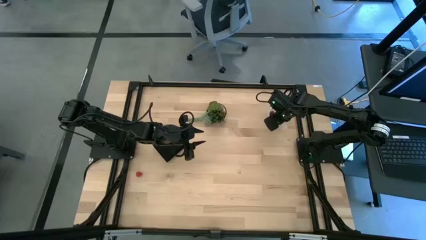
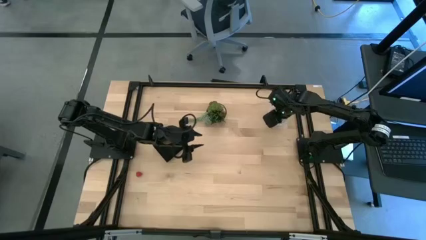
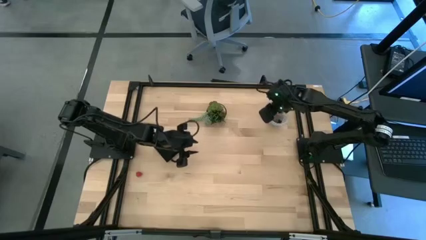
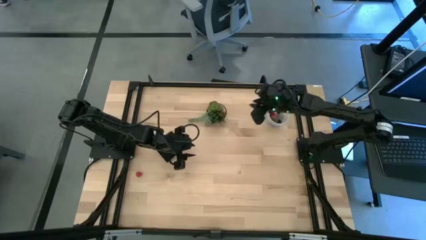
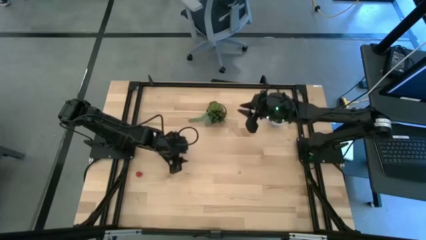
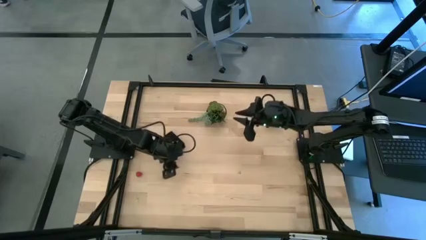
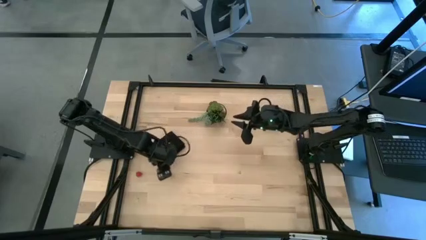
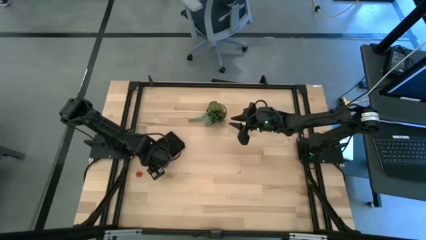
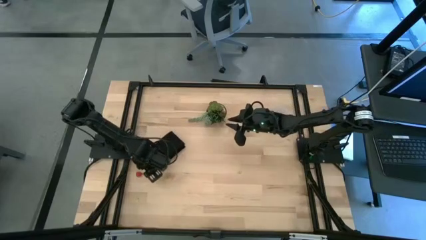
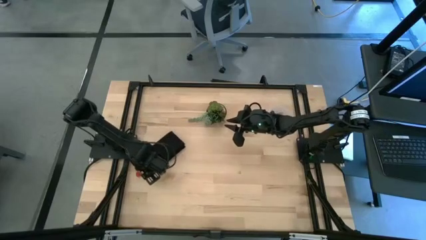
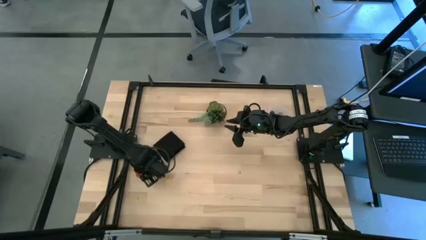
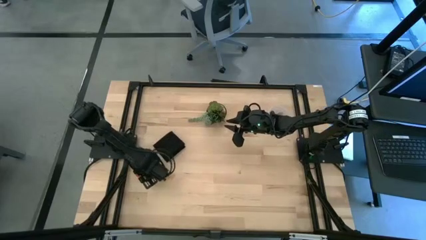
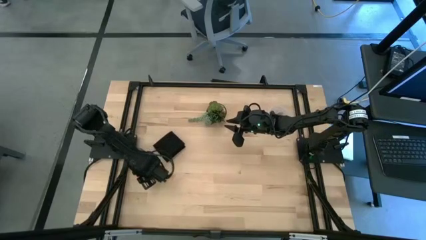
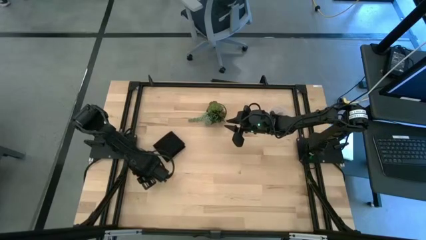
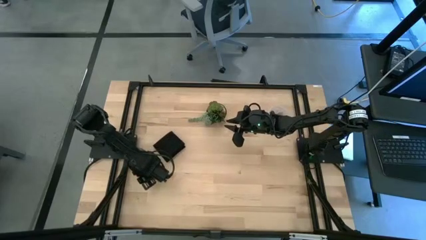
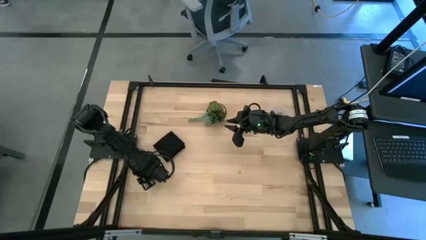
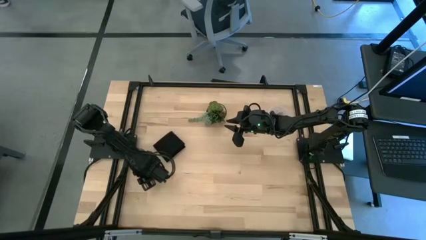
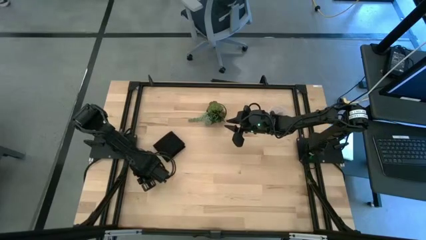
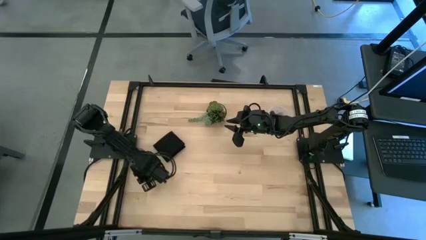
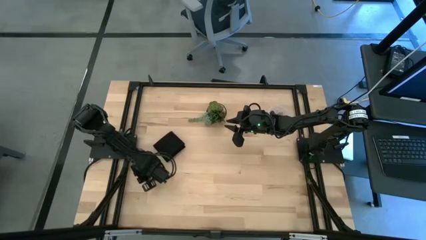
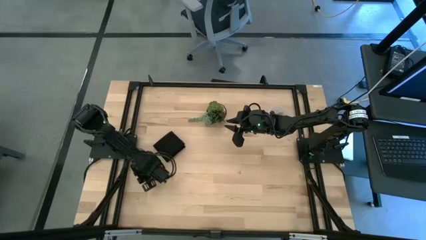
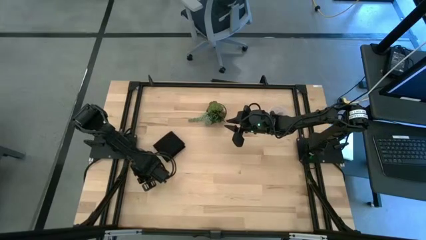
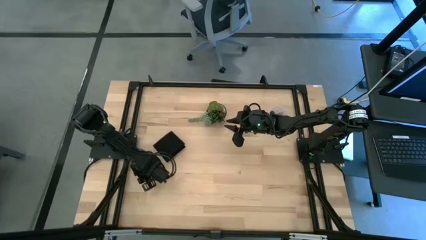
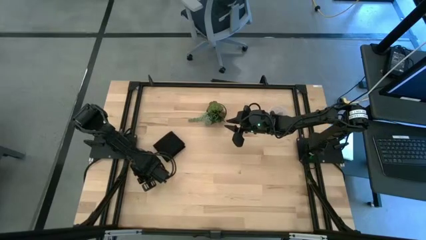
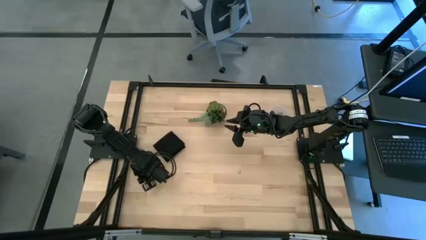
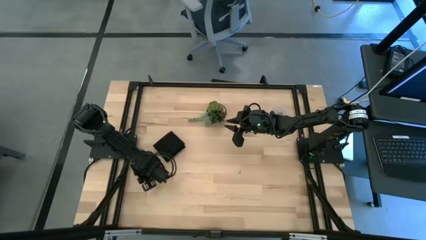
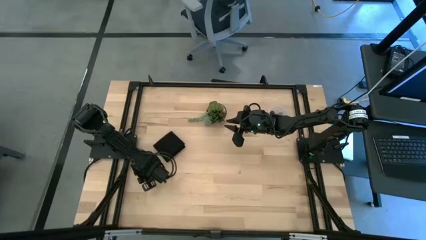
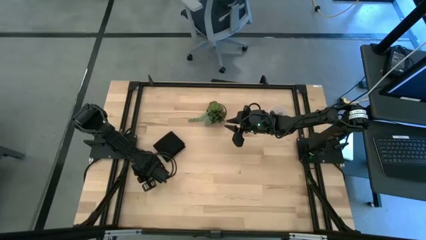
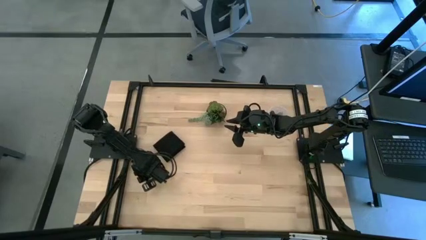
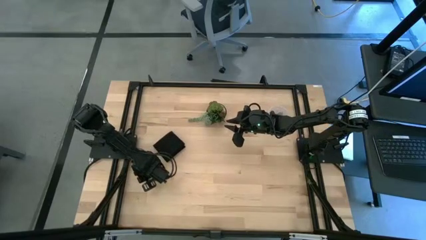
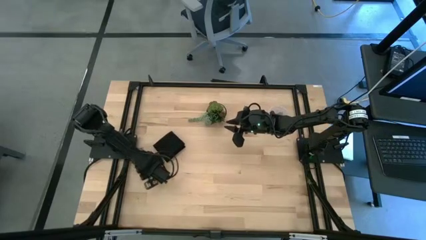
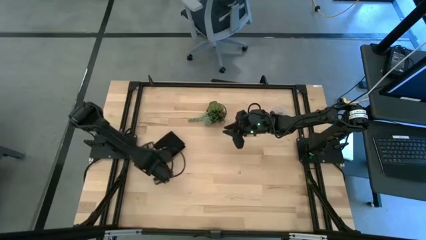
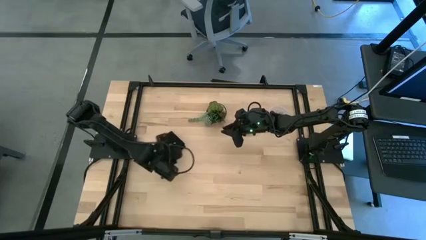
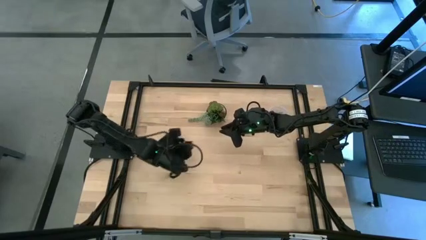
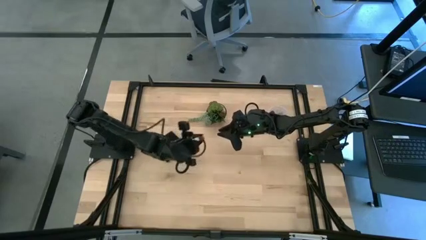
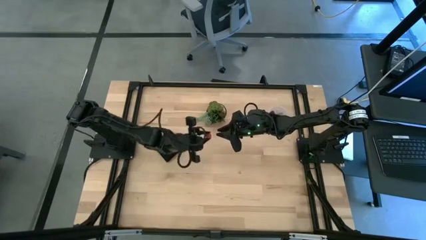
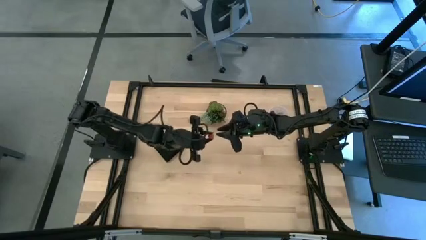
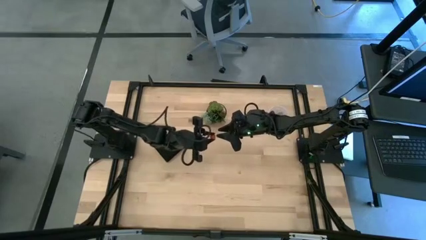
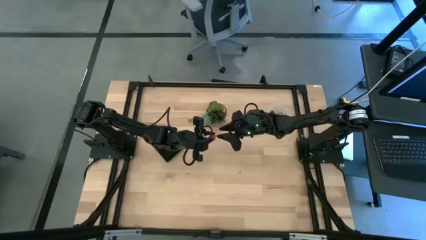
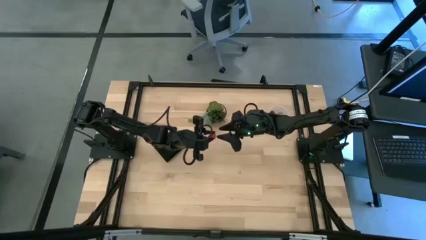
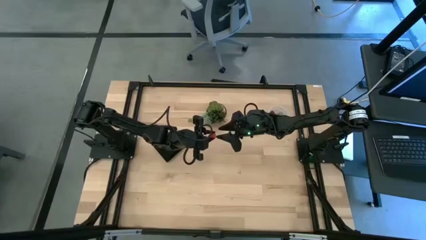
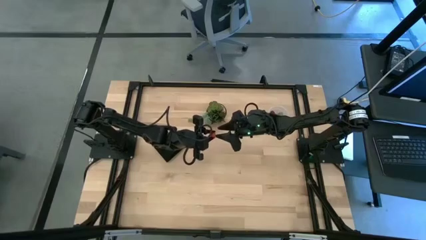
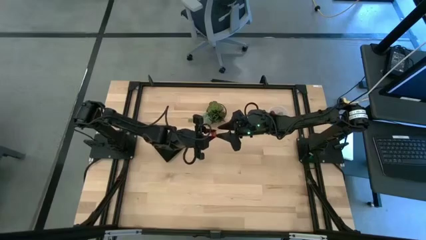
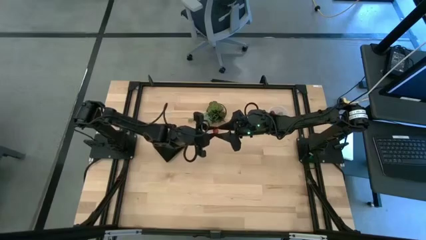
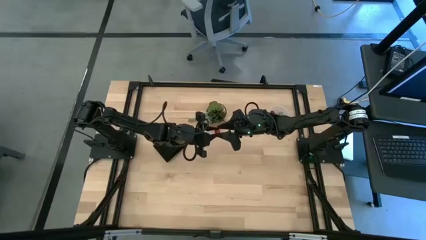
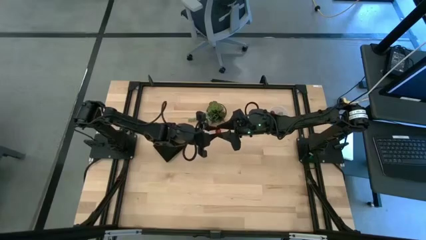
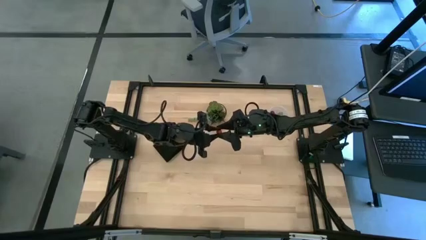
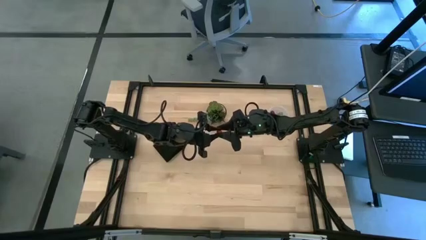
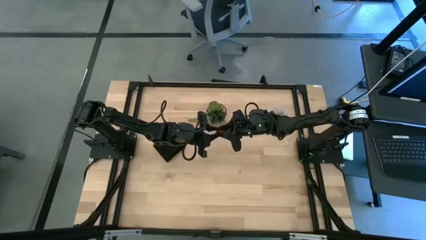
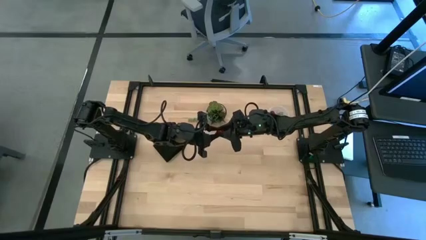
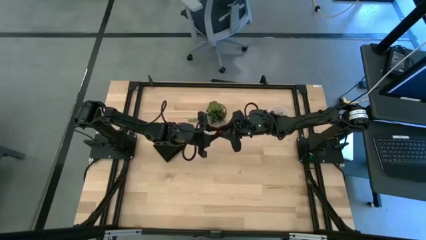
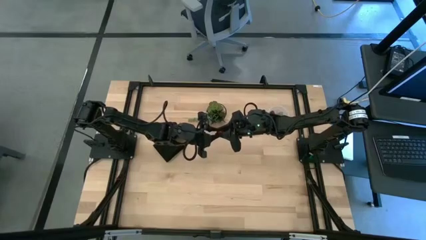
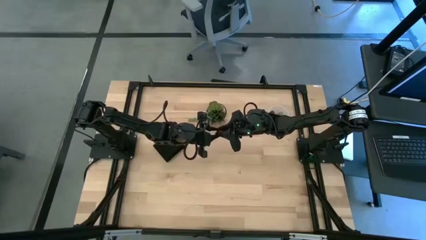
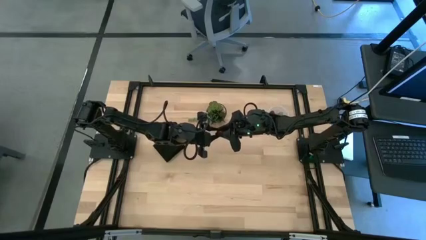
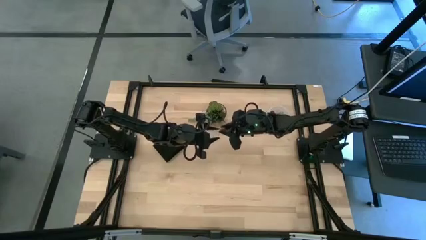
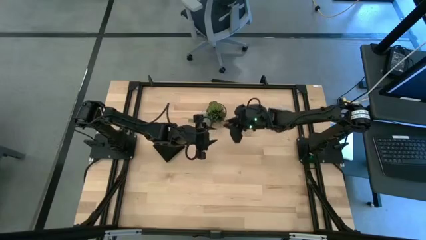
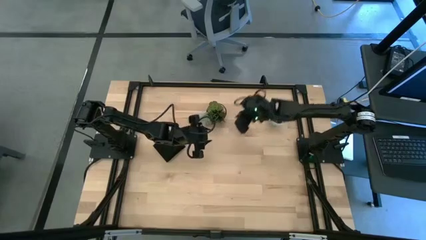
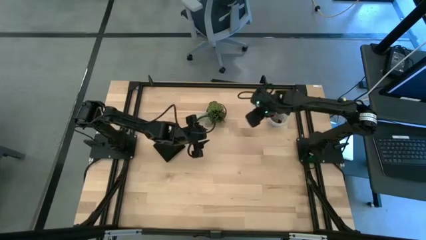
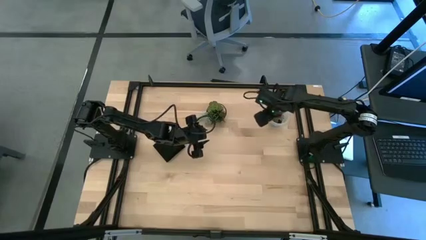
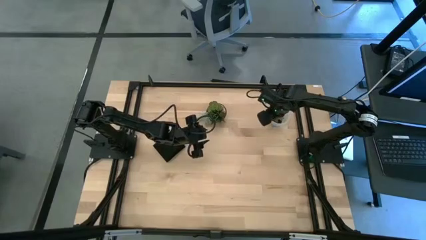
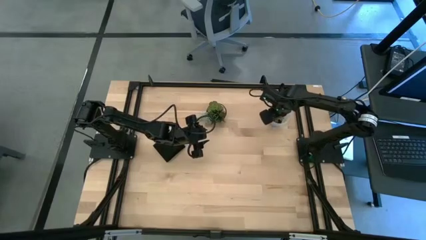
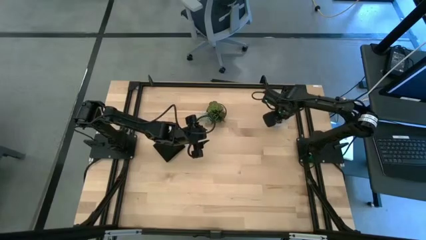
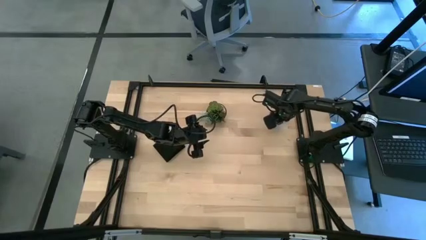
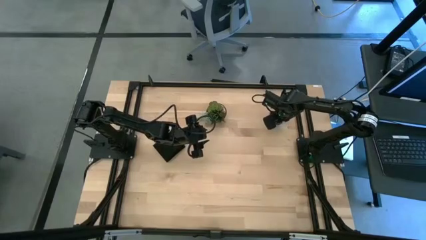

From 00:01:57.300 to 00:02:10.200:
Task: Pick and placing Produce into tupperware
Put the red raspberry into the bin

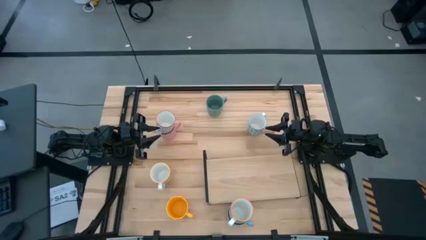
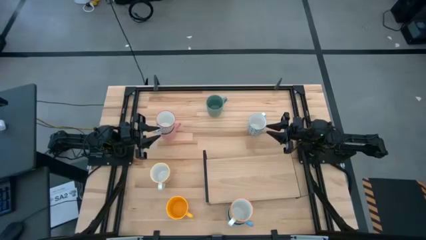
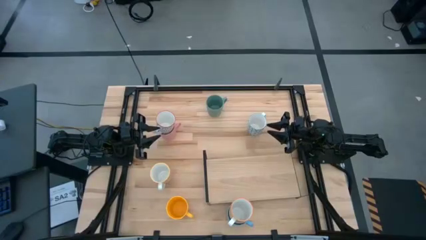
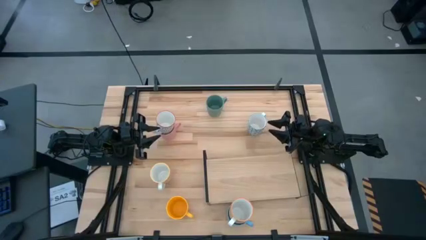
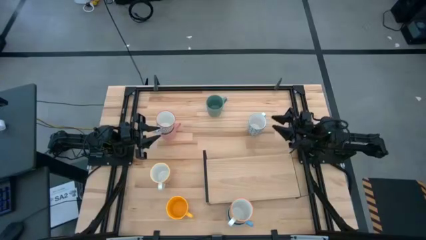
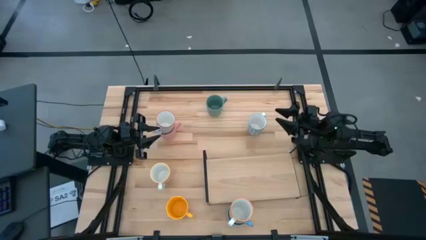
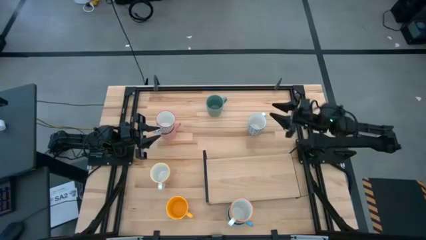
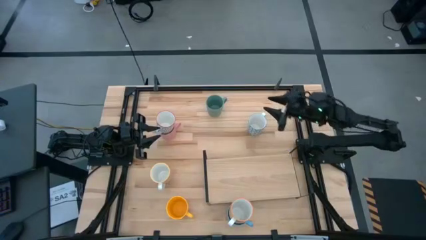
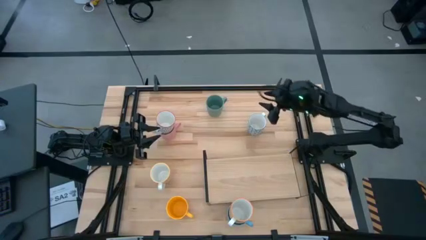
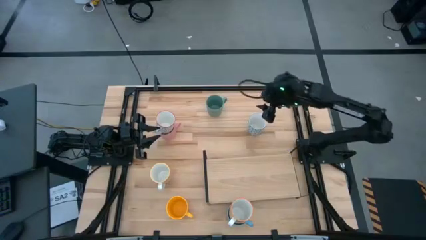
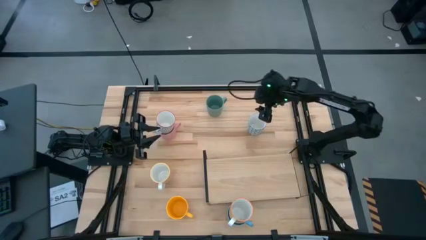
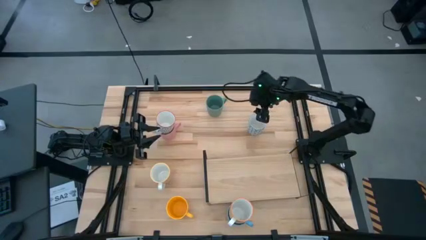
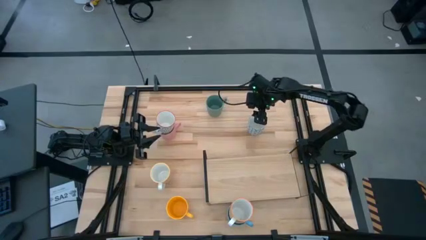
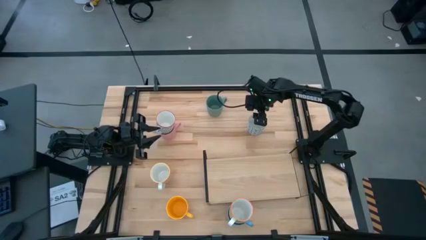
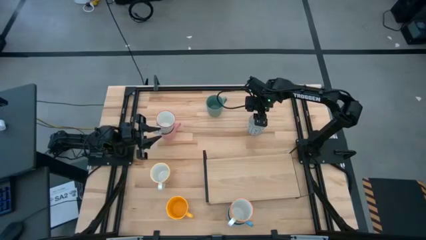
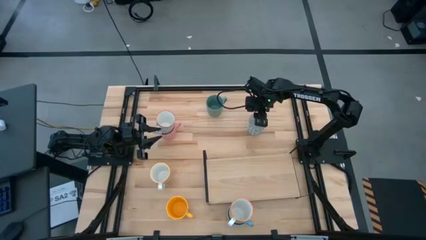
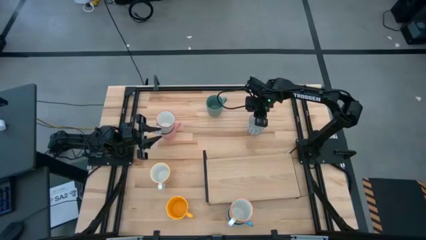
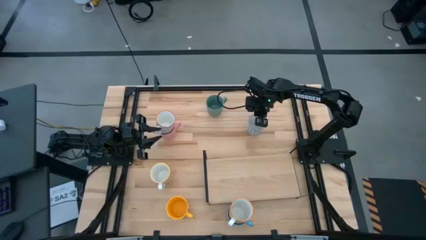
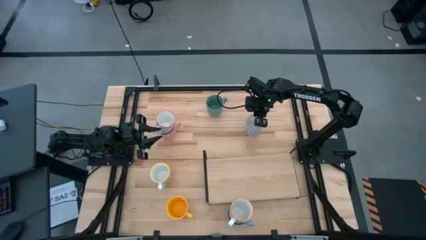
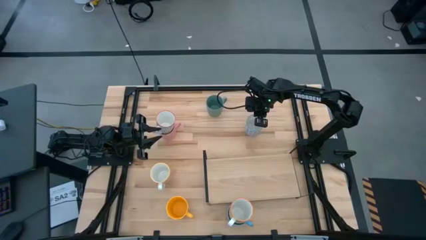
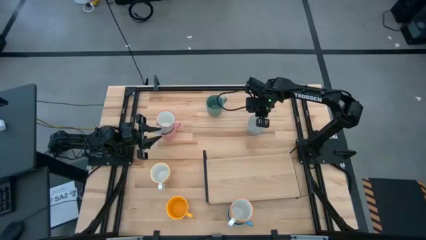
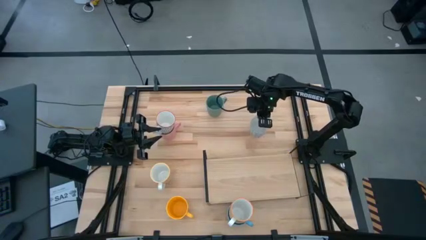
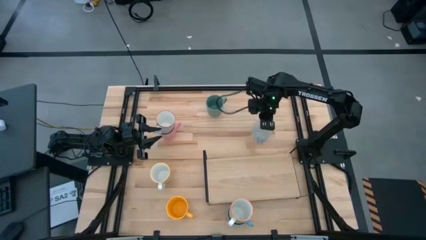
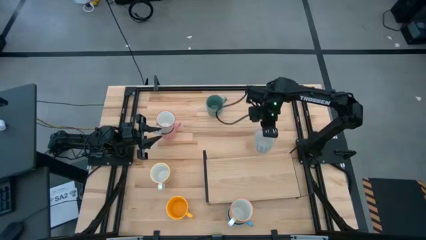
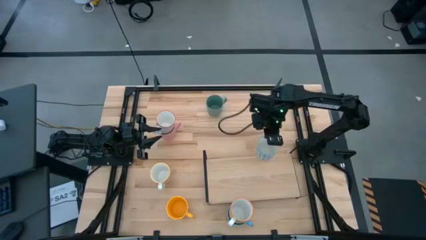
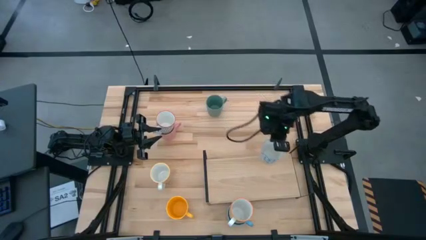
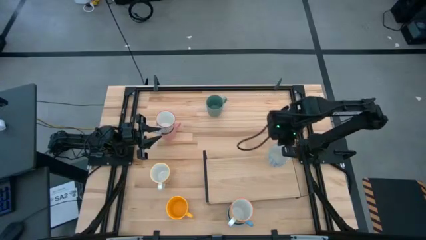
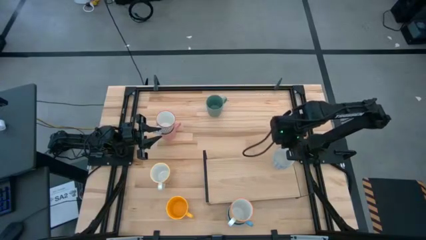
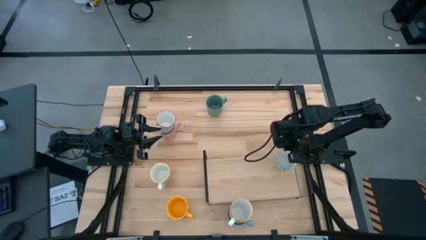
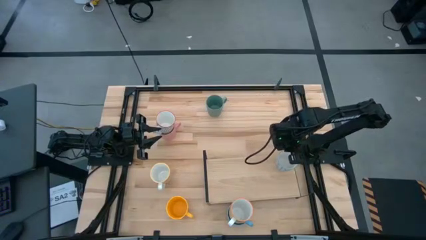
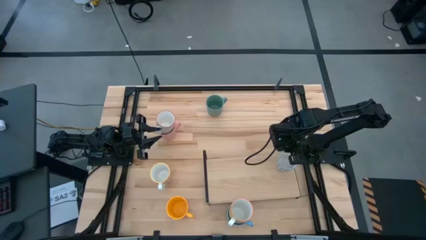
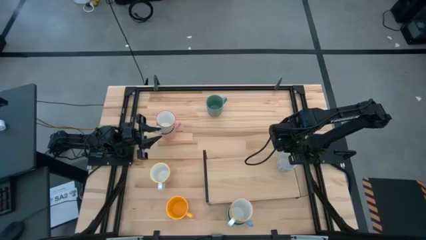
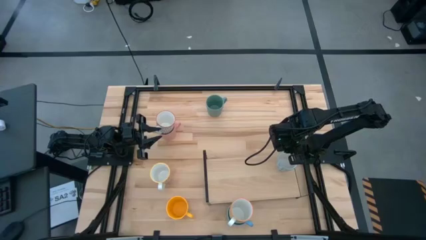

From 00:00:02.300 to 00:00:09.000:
Task: Place coffee mugs
Put the blue patterned mug on the shelf
